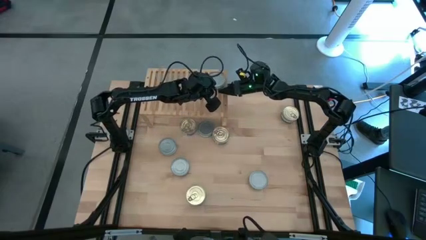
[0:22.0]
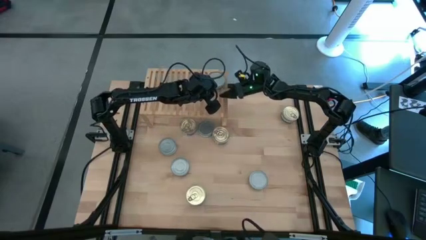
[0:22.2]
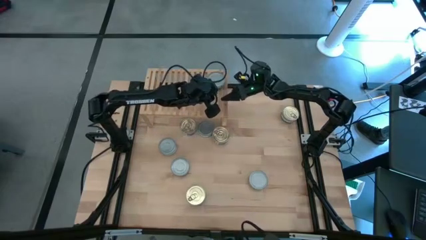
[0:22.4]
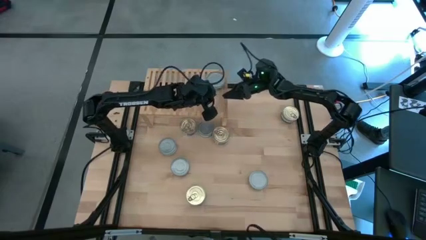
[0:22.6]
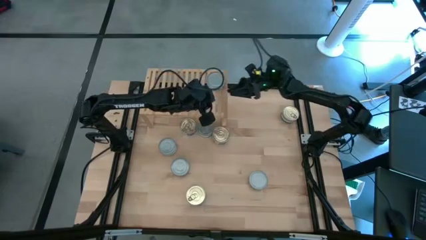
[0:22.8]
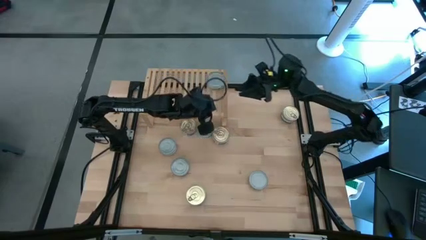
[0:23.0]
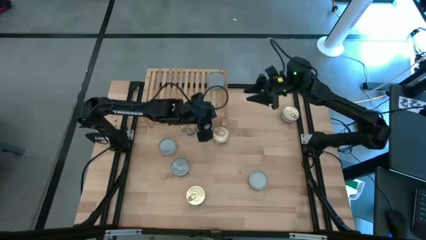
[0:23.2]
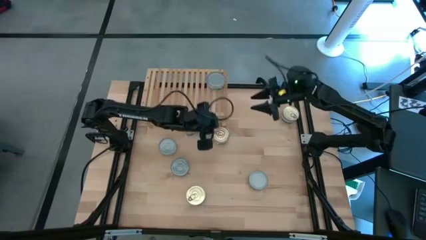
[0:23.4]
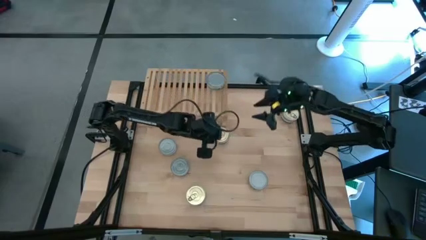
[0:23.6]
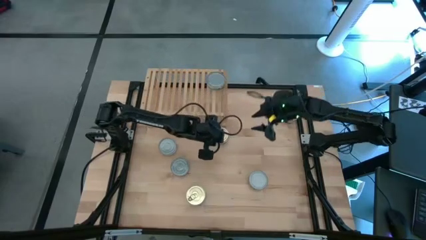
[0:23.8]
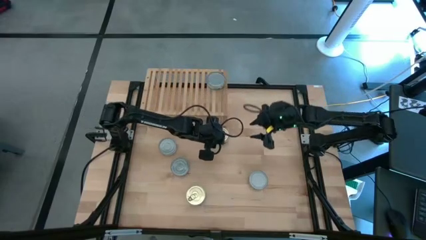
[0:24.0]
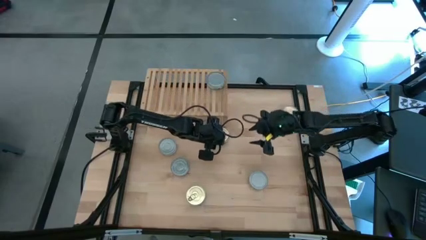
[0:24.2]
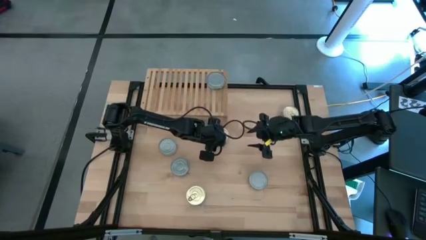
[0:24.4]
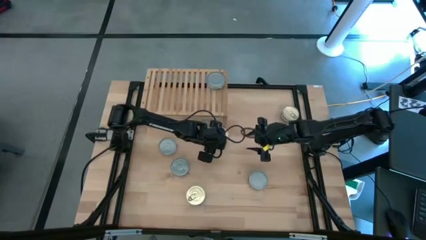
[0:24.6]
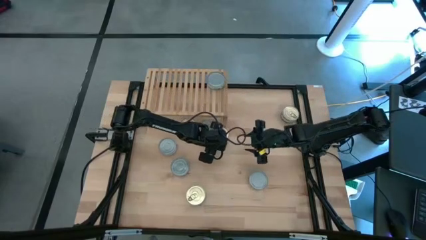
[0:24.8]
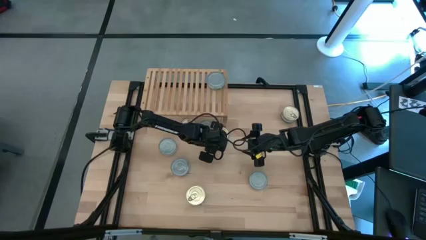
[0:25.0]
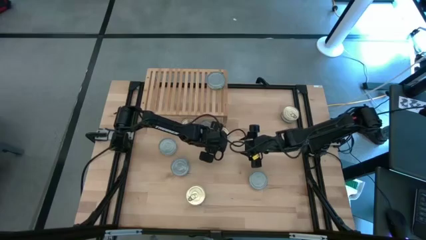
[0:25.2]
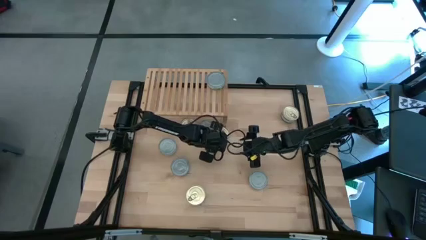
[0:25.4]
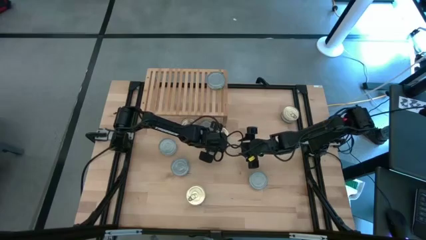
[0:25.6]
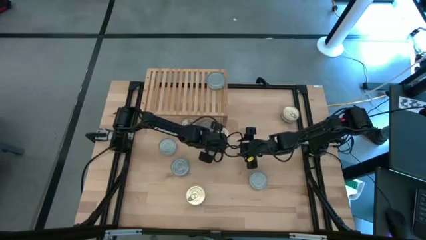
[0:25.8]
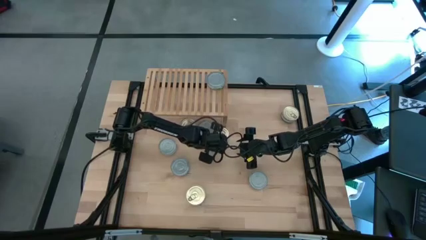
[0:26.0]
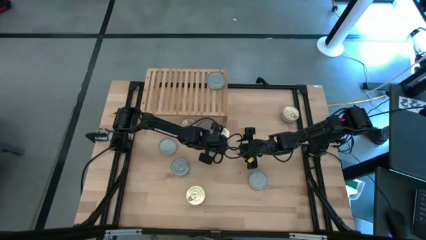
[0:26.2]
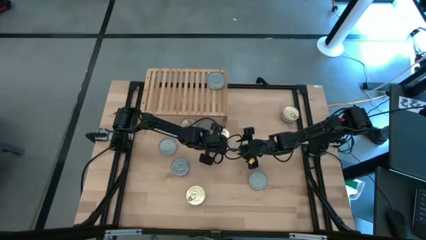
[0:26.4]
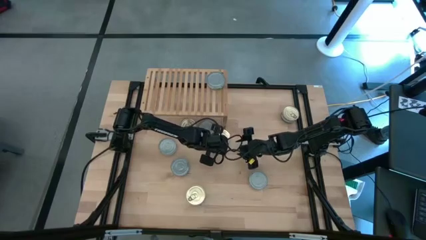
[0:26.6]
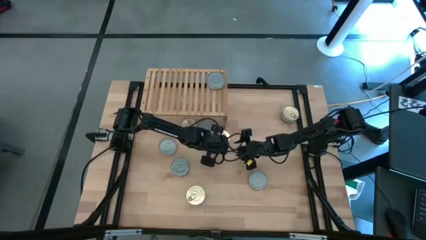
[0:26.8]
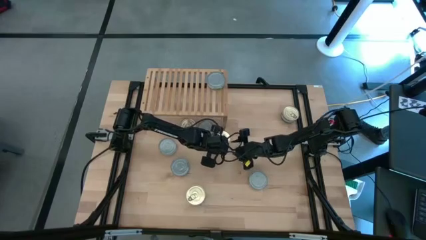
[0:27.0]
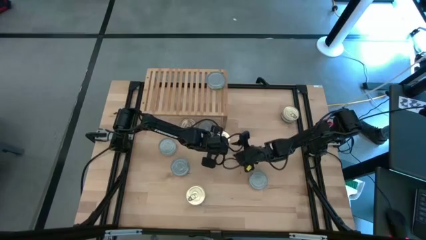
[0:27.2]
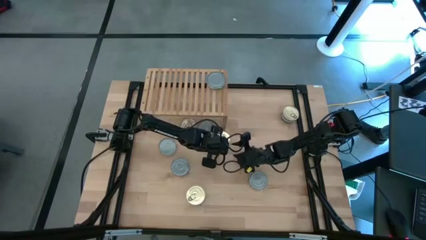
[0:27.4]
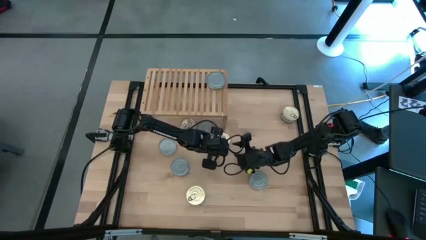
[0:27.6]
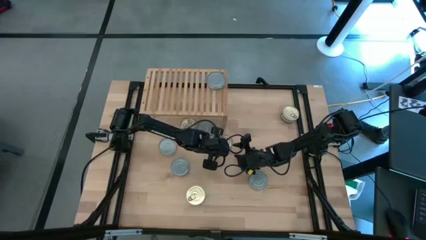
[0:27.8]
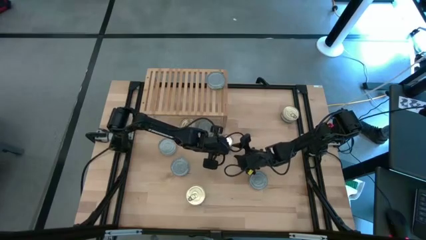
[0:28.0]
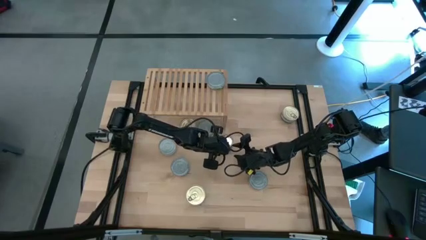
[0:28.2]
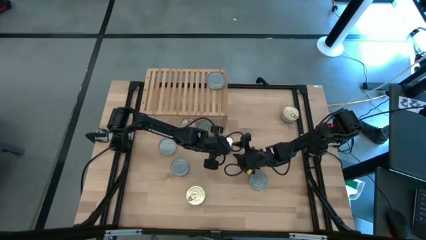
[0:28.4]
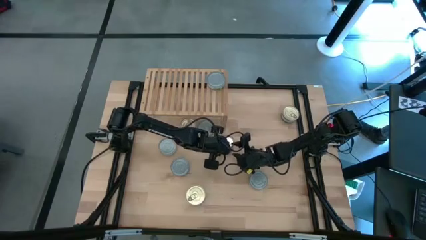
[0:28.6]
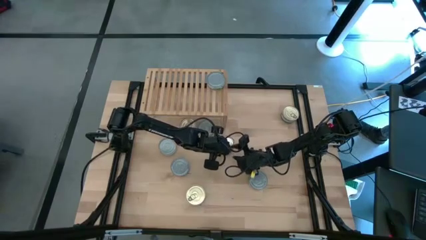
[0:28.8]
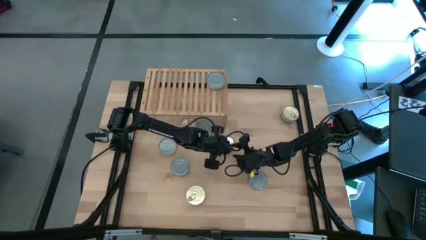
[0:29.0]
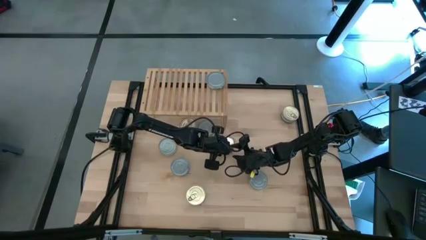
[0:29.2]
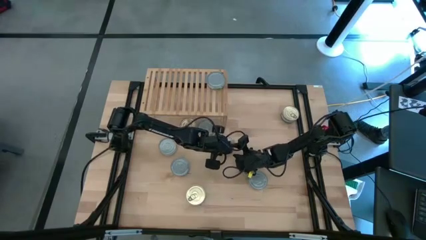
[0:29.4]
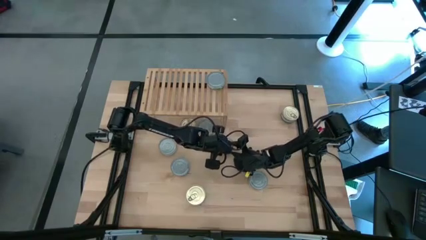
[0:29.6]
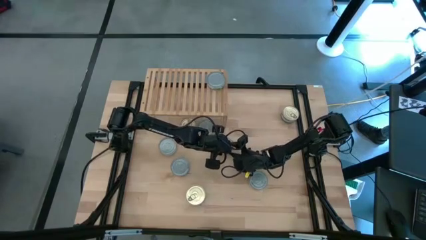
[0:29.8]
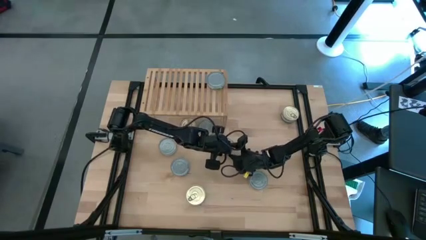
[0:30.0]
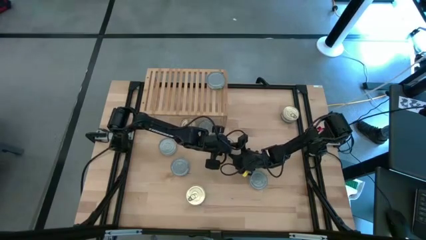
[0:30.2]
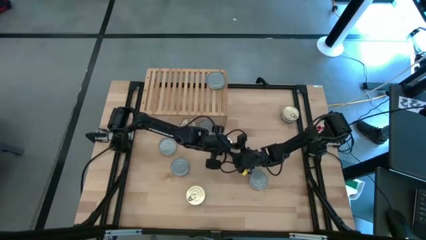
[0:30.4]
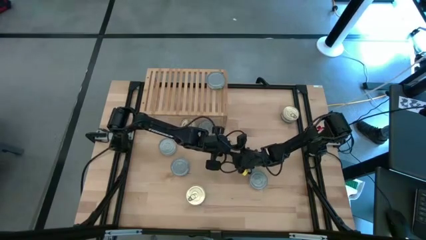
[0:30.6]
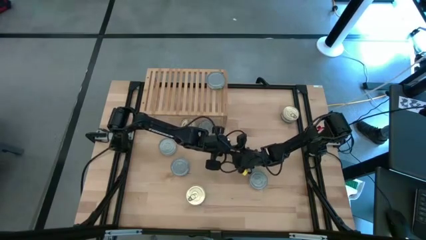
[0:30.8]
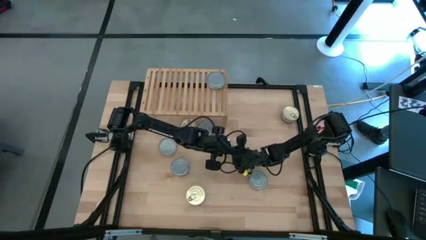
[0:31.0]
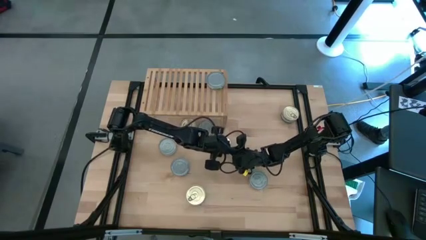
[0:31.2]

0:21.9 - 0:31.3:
Task: Stack canned seafood by type on shelf
Put the blue tuna can on the shelf

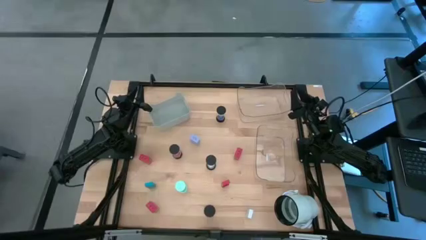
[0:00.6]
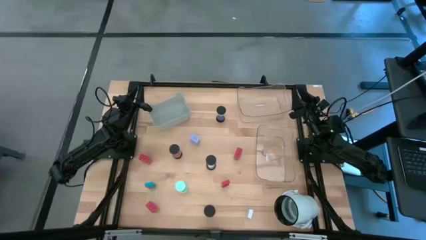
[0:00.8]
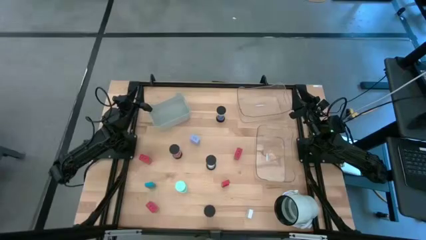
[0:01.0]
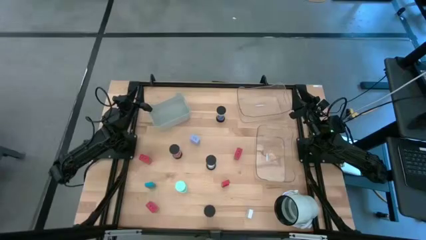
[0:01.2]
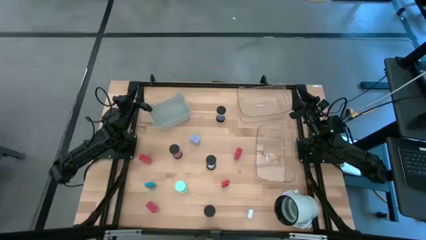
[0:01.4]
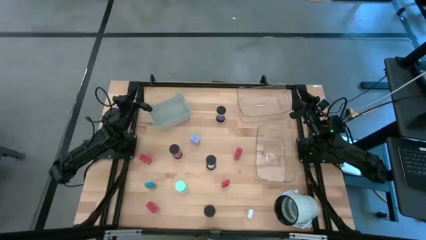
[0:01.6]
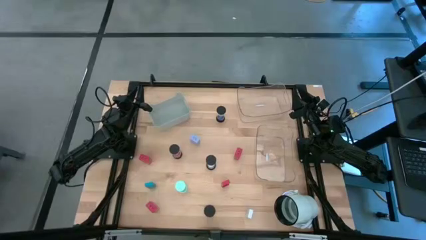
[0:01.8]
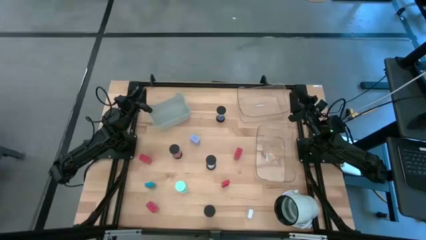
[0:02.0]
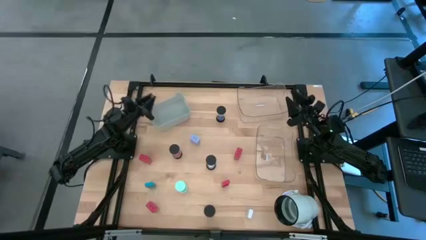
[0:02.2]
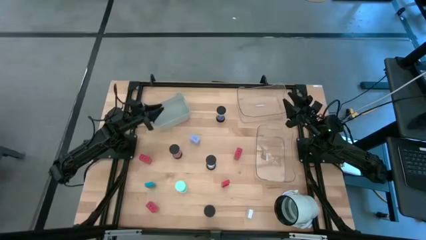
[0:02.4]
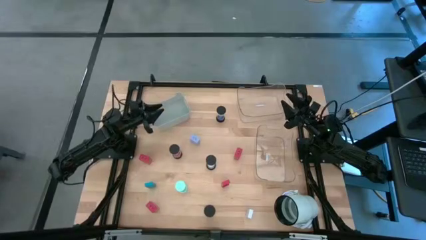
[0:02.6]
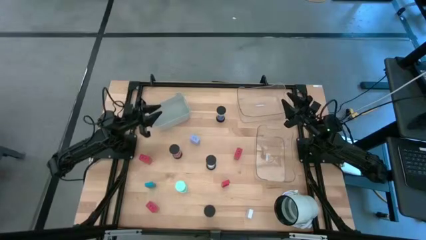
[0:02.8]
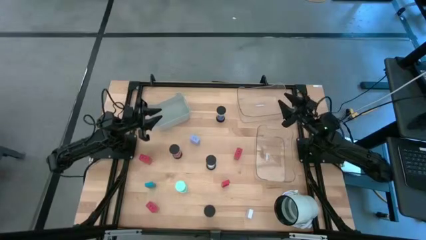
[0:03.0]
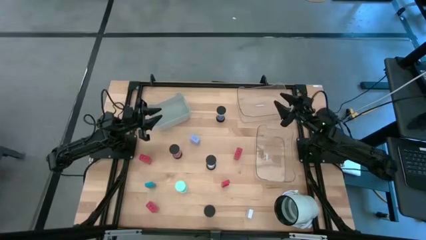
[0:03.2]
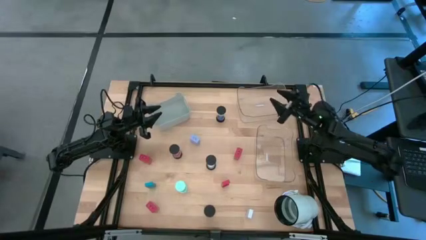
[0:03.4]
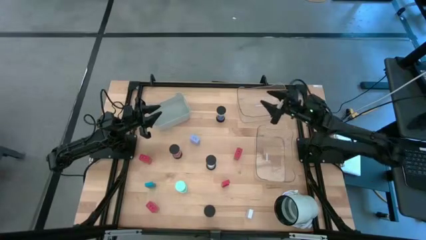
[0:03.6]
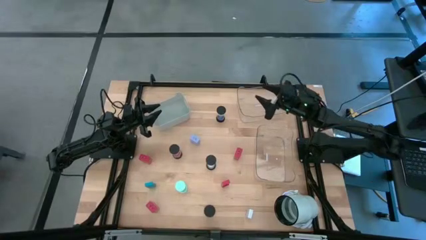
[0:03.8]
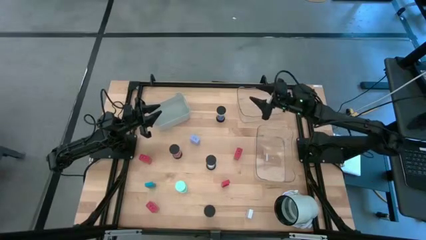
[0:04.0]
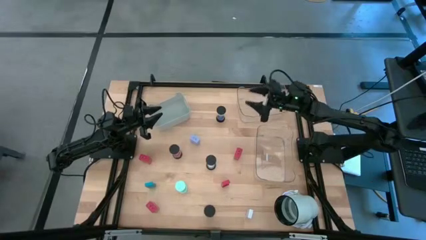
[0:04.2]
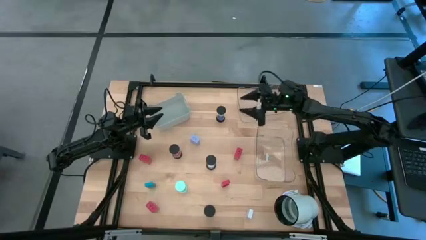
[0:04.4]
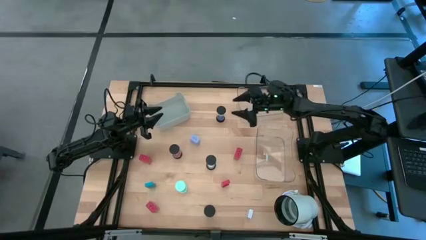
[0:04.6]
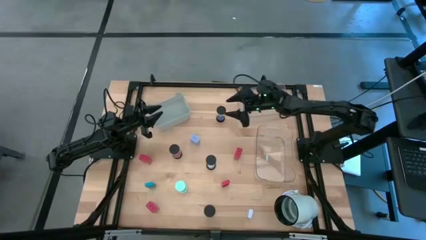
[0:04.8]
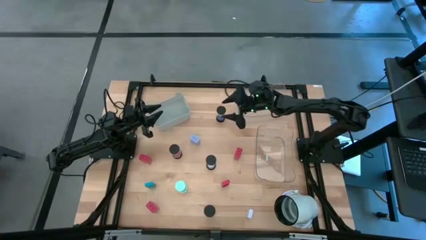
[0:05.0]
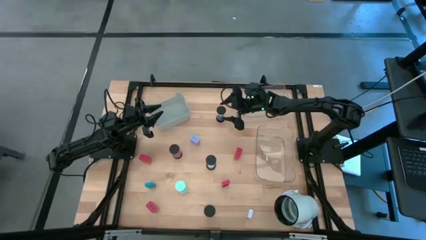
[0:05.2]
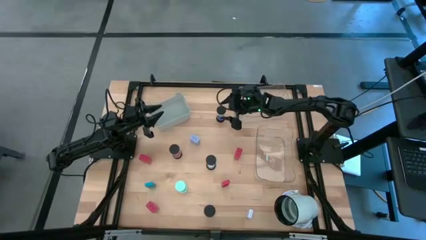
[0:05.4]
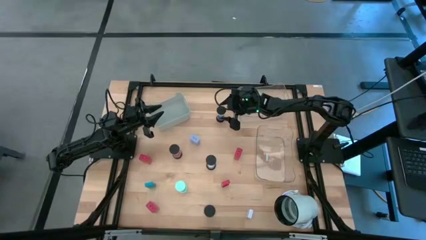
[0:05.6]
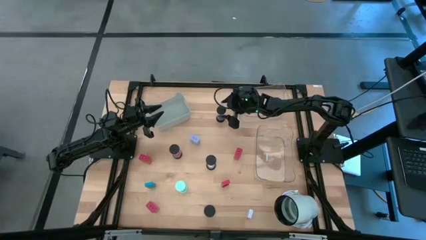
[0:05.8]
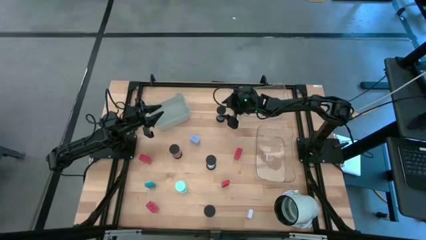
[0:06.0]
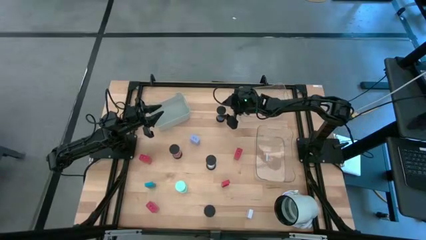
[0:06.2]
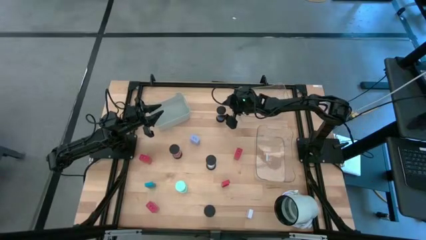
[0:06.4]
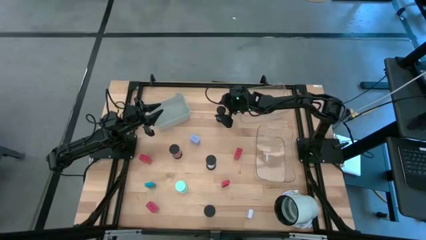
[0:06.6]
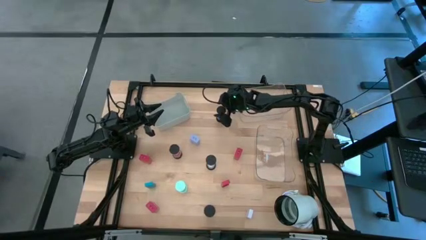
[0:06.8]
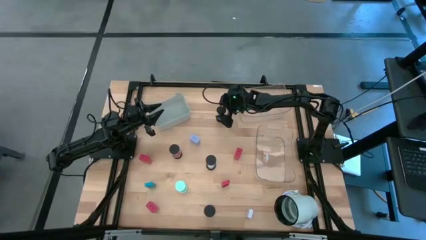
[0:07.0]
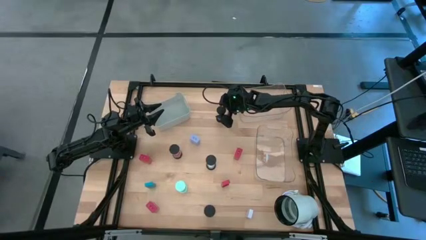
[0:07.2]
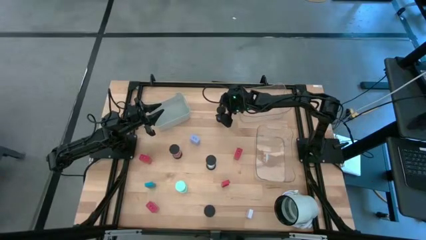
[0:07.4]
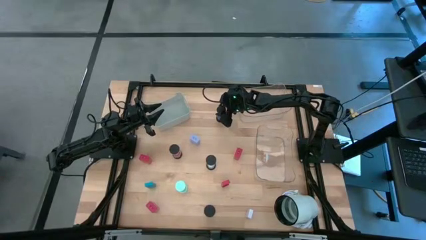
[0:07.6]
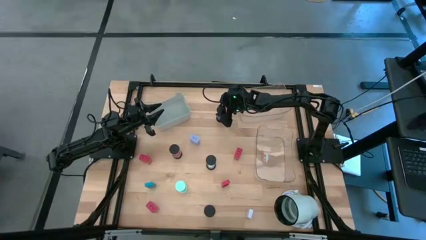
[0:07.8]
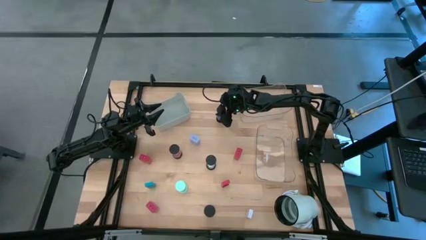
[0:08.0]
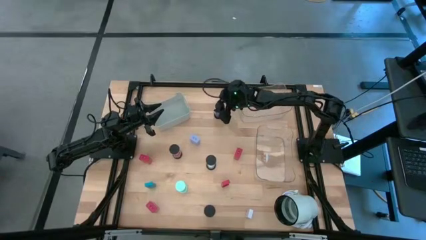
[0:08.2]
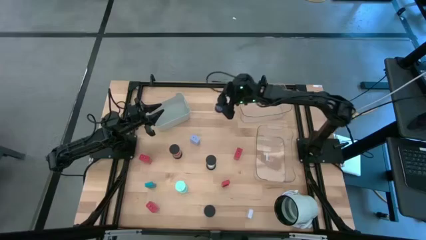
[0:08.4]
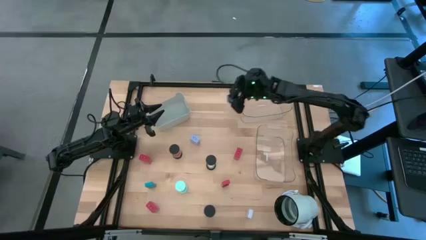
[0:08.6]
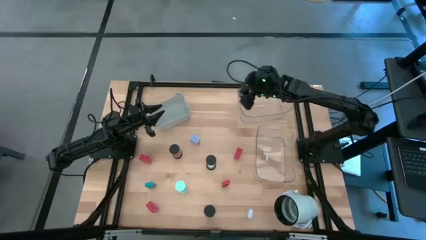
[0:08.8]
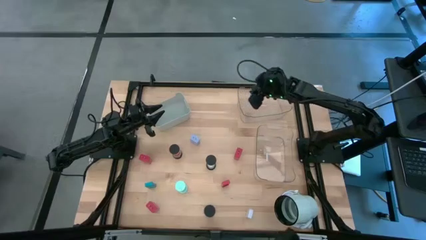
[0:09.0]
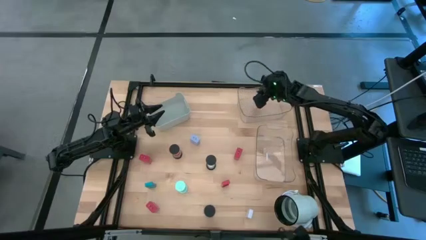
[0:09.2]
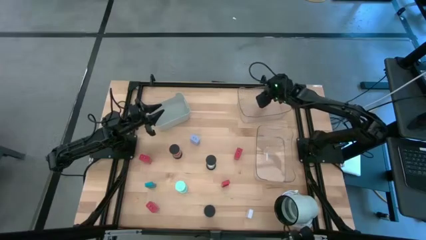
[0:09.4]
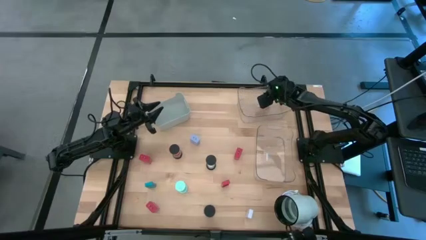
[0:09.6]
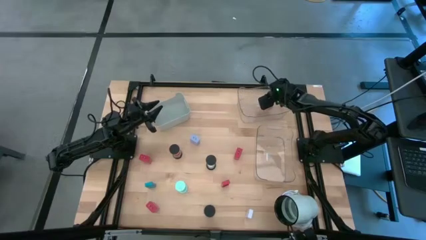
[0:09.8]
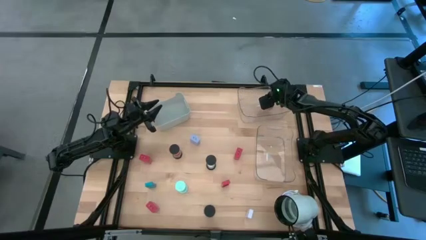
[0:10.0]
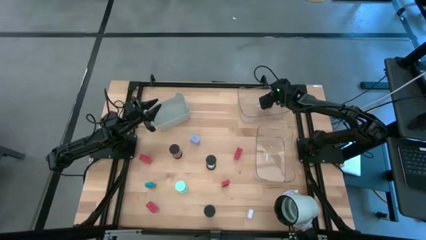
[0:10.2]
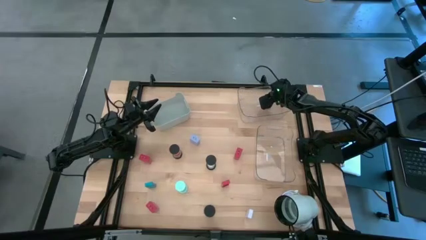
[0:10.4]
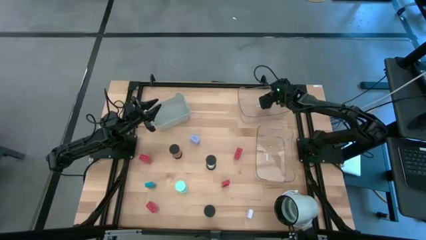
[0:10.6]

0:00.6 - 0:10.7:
Task: Pick & Place Office items
Put the purple hourglass into the top transparent bin
